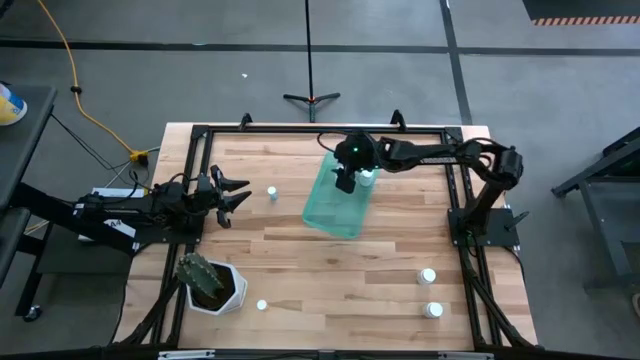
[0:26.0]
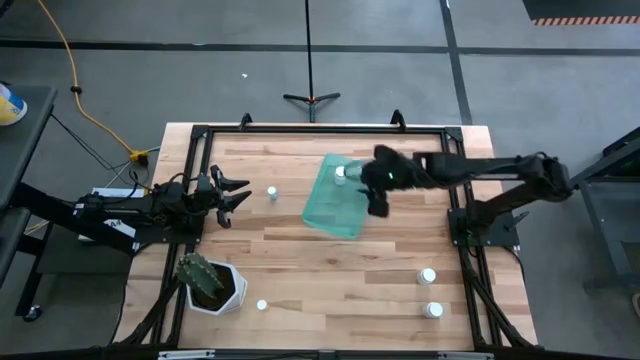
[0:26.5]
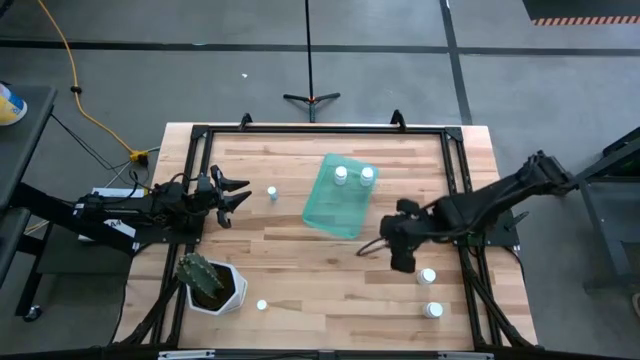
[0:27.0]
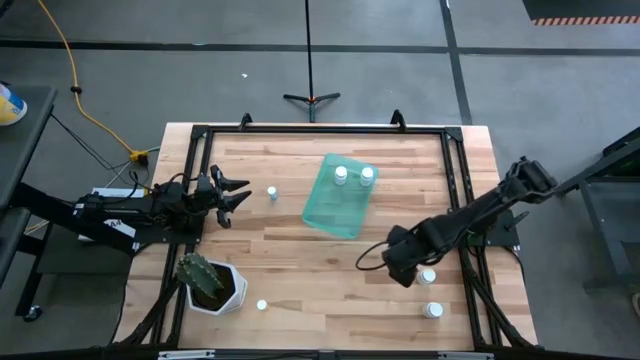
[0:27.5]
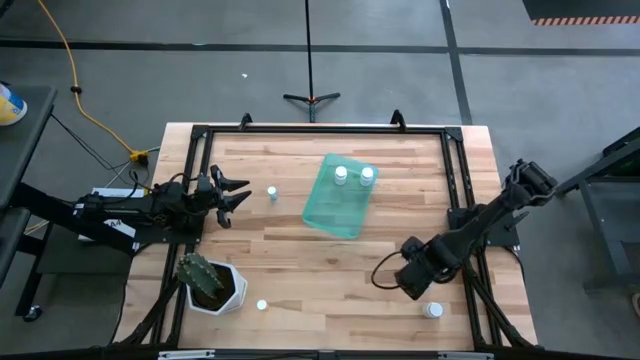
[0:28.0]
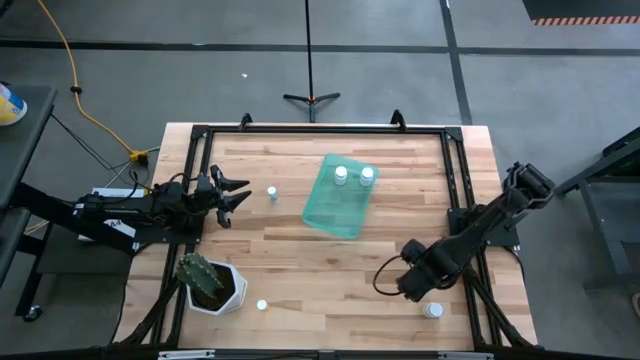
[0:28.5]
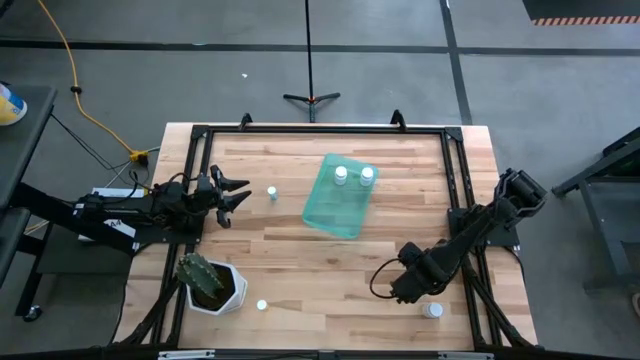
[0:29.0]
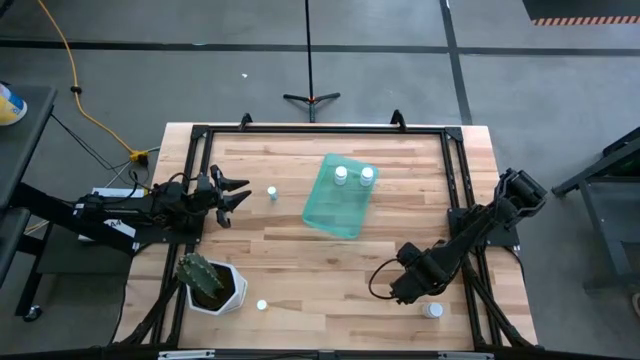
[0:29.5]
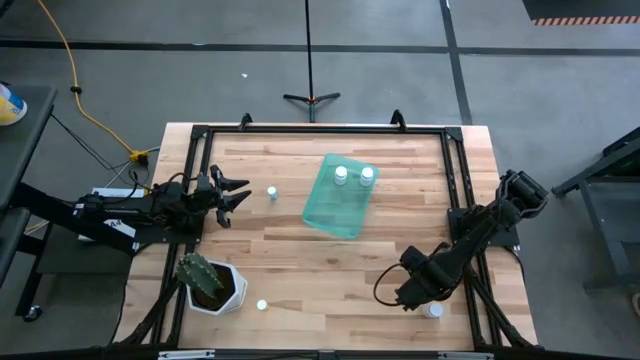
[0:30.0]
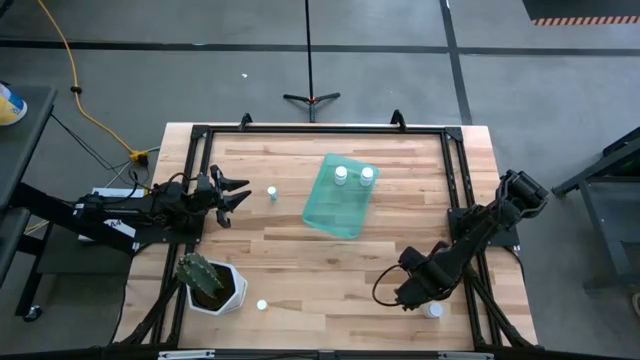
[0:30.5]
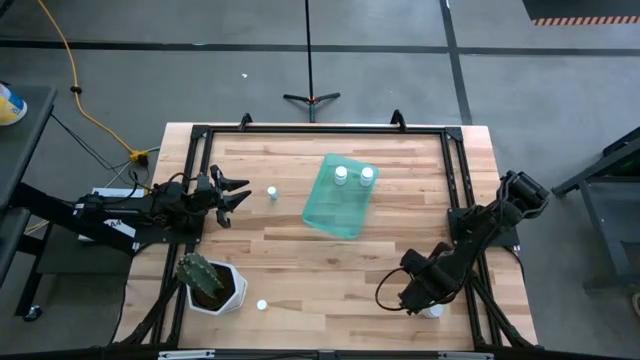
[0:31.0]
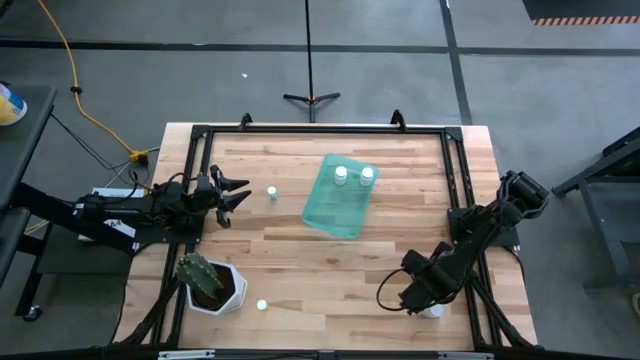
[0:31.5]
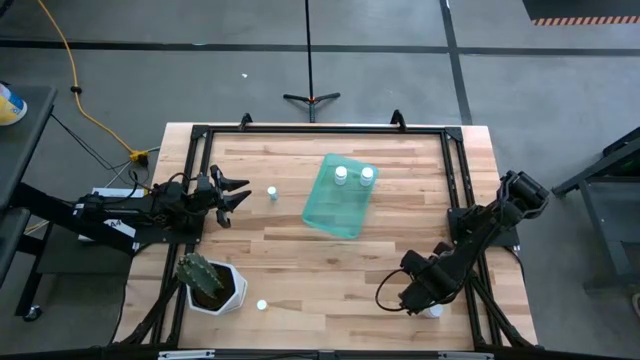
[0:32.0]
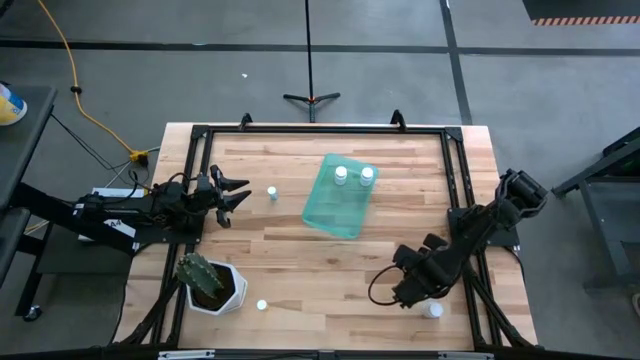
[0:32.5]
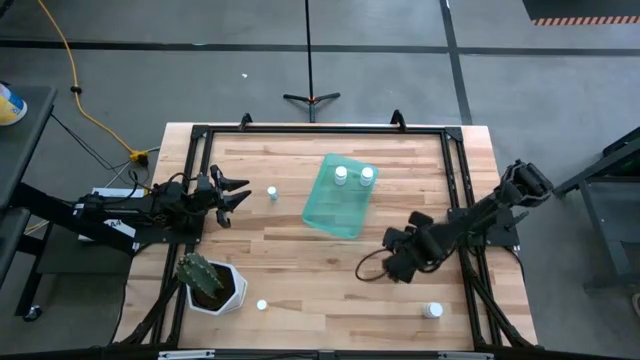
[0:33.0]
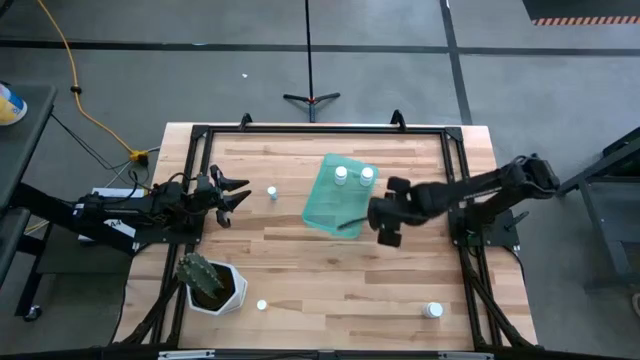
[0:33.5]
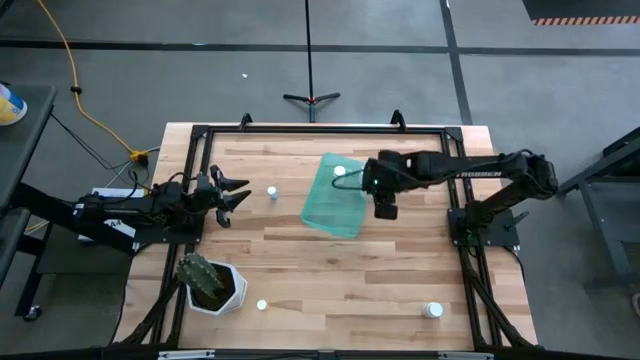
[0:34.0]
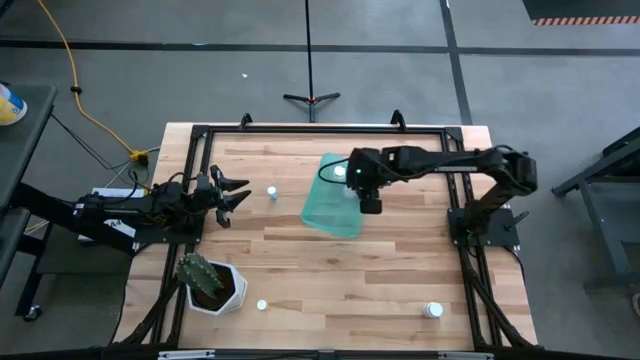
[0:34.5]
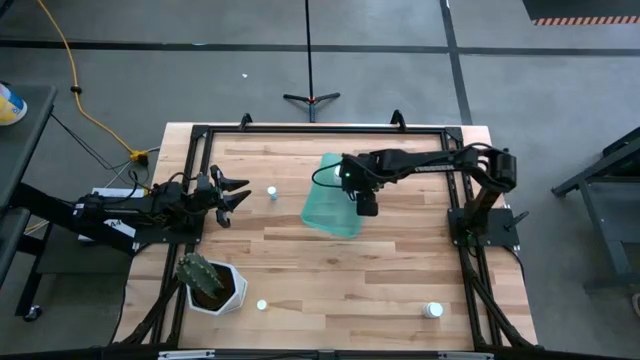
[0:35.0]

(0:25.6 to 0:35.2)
Task: Pick and place pill bottles into a basket
Put the top white pill bottle into the blue bin

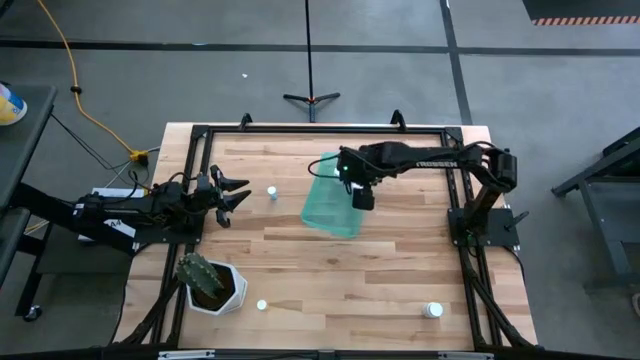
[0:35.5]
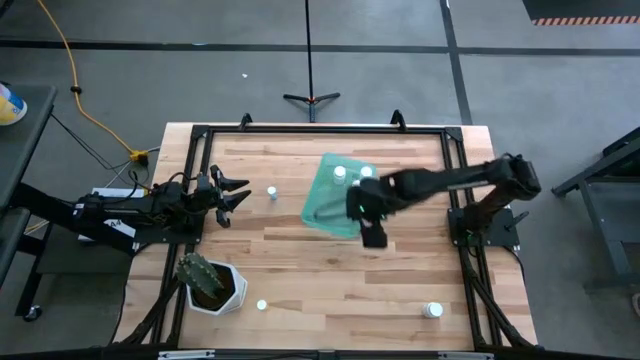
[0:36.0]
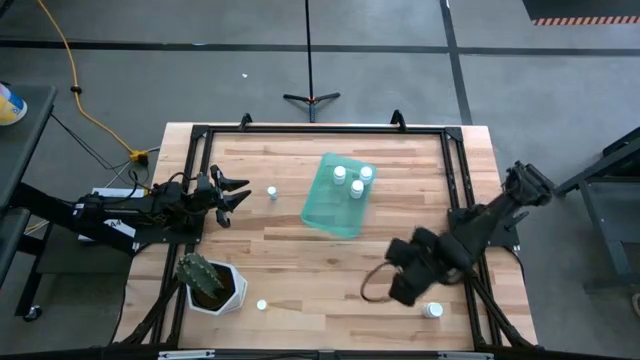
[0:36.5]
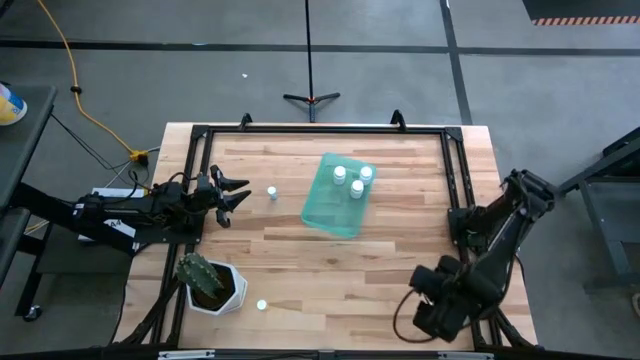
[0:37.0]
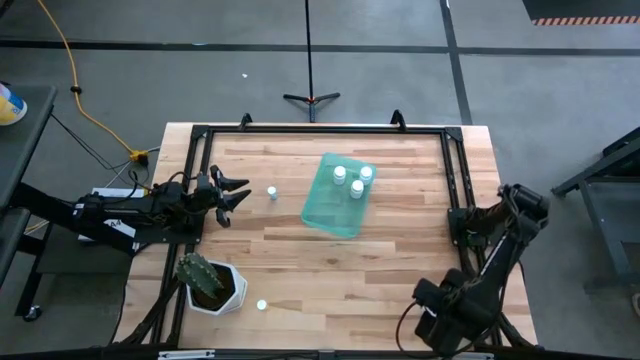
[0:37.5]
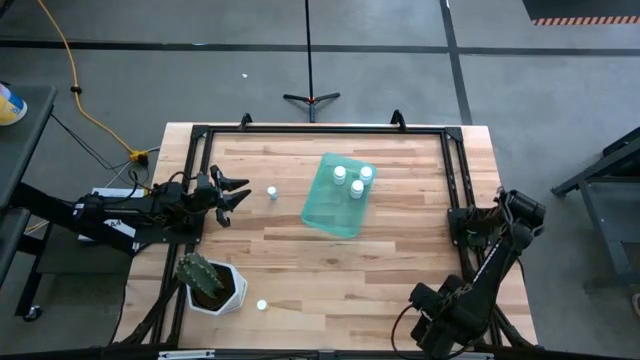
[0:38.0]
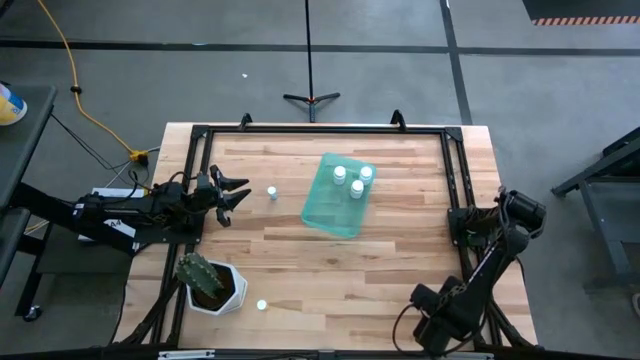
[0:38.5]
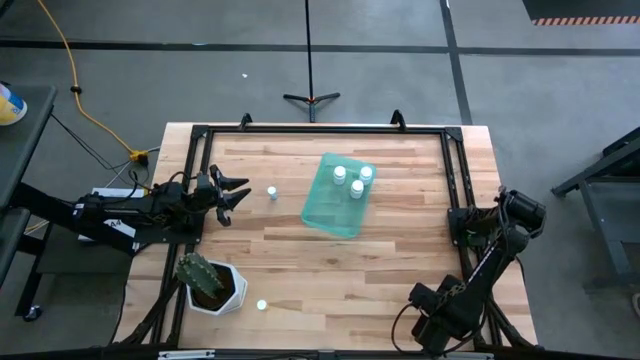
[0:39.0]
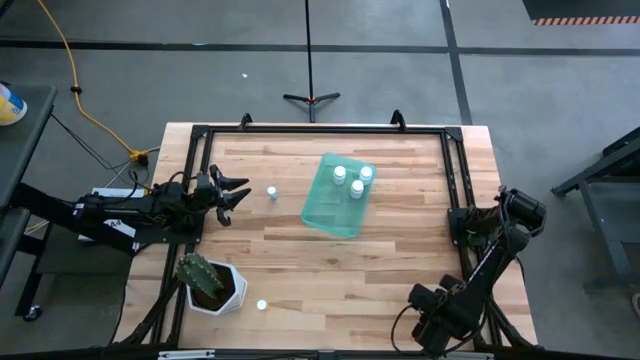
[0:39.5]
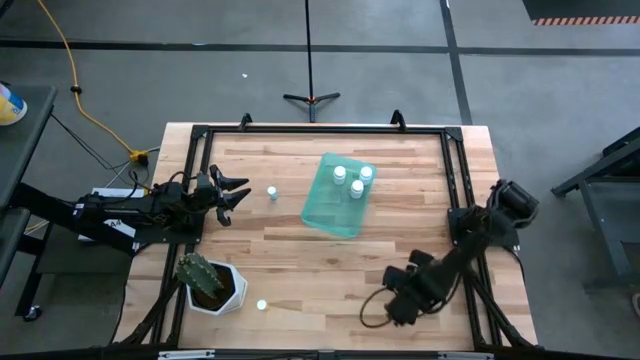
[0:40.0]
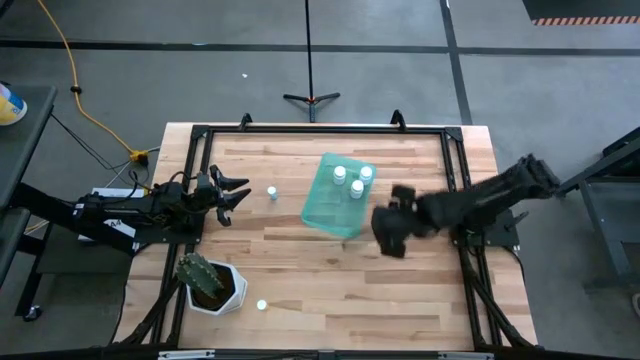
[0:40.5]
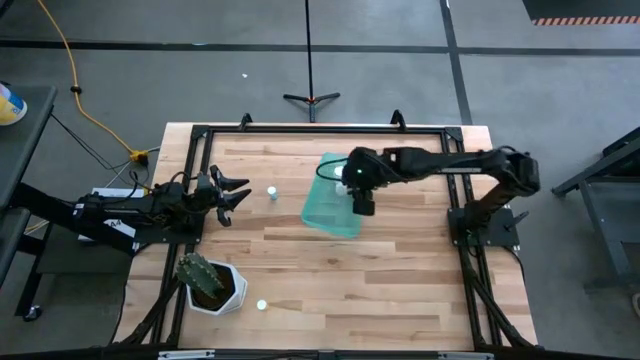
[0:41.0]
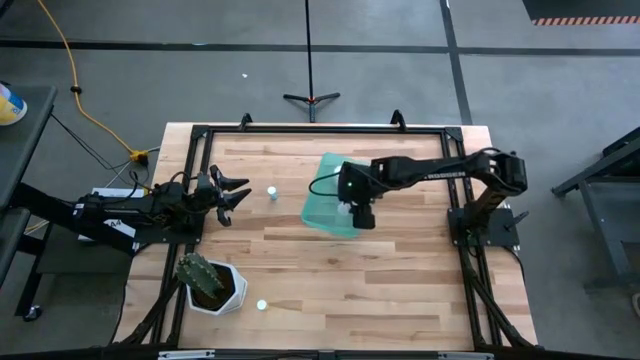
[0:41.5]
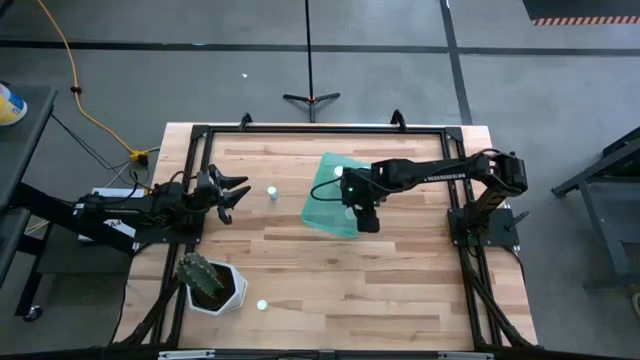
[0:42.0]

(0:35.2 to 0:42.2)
Put the white pill bottle into the blue bin

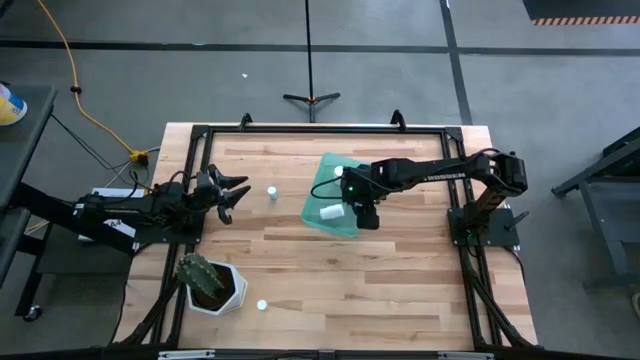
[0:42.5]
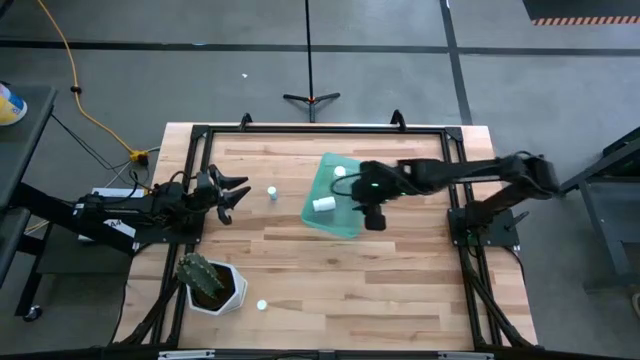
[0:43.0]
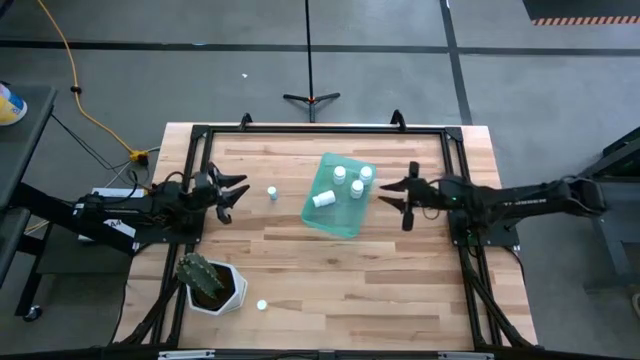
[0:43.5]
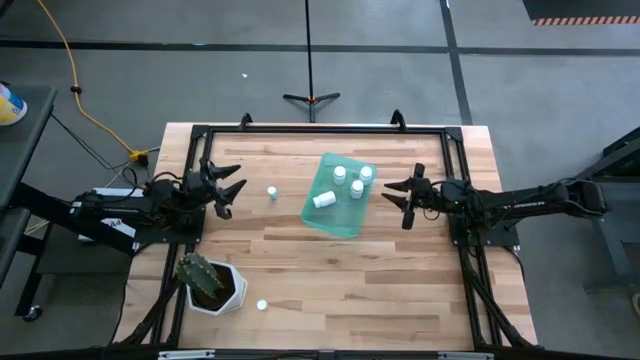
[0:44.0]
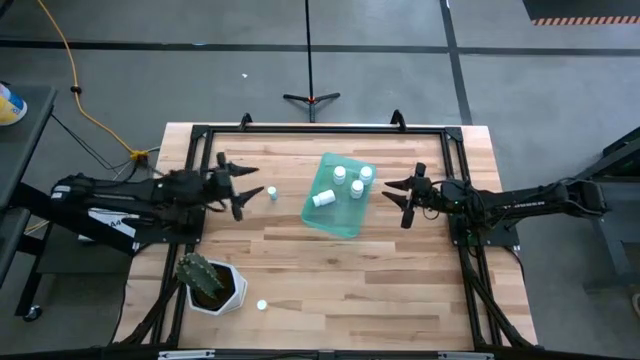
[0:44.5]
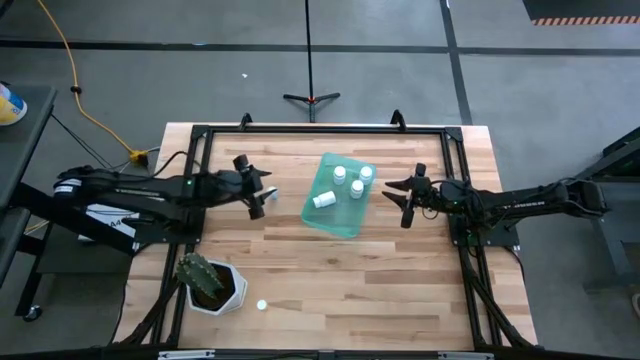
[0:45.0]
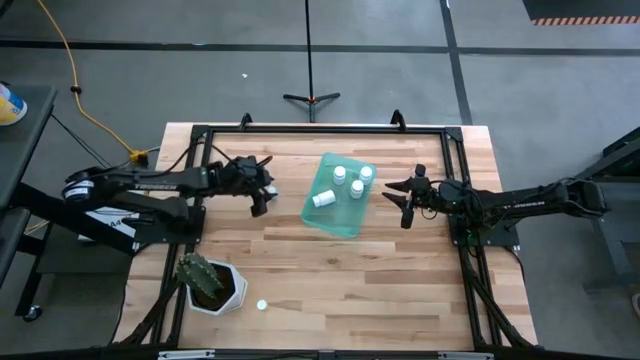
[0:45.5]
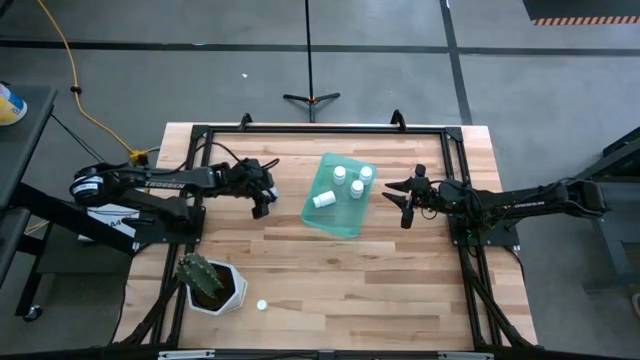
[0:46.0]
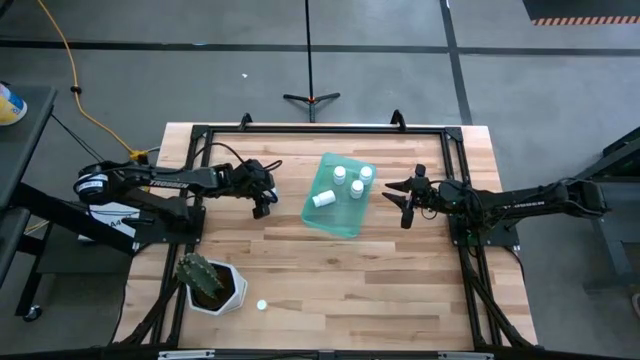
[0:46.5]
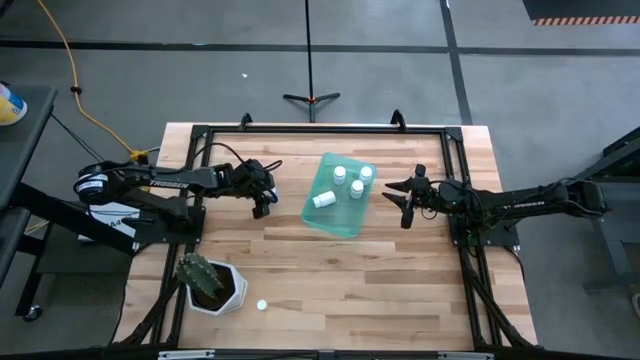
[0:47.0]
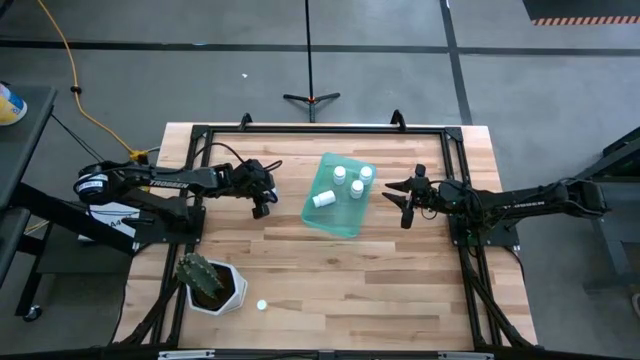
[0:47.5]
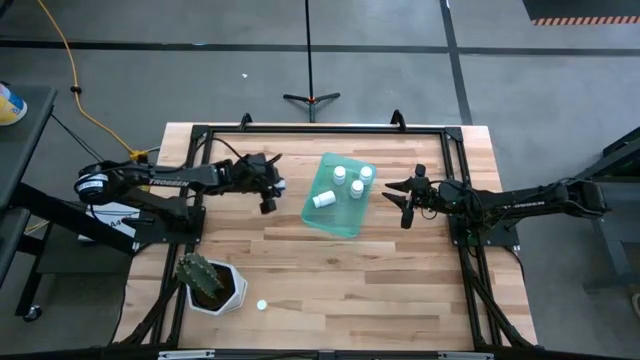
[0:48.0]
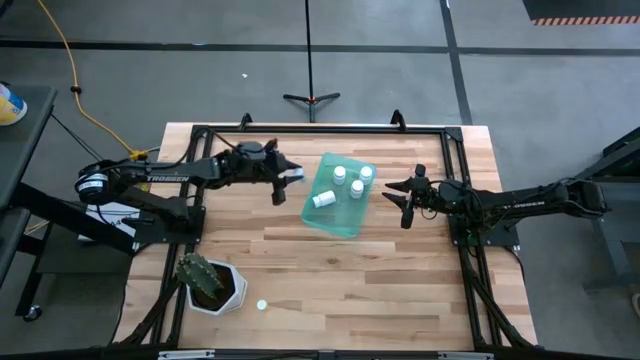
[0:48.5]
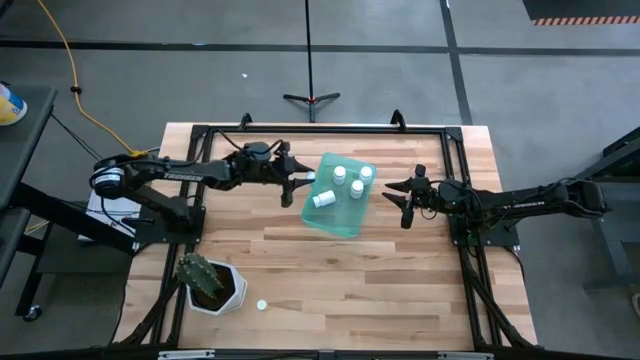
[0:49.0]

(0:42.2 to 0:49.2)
Put the blue pill bottle into the blue bin
